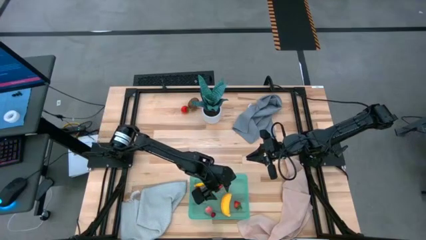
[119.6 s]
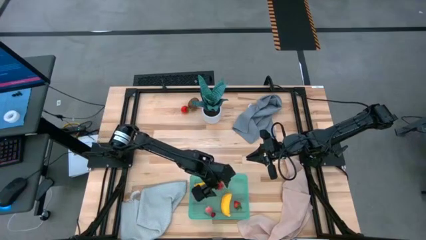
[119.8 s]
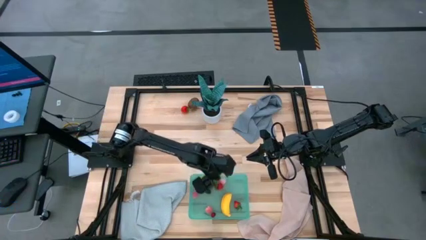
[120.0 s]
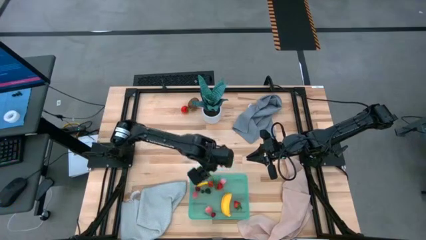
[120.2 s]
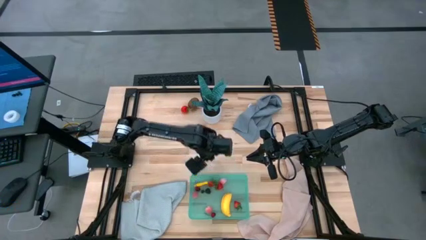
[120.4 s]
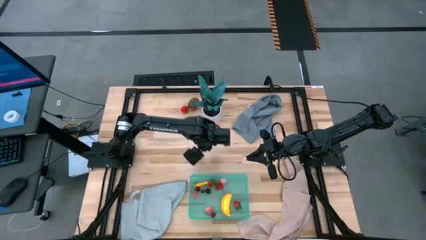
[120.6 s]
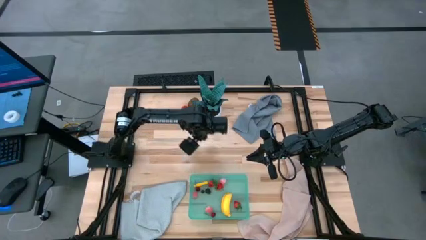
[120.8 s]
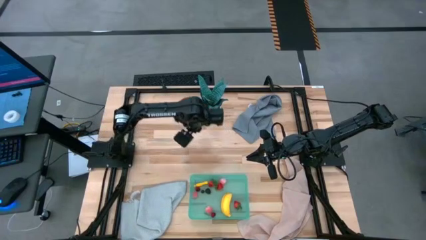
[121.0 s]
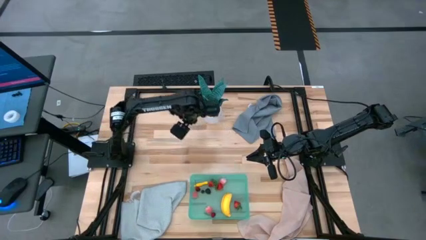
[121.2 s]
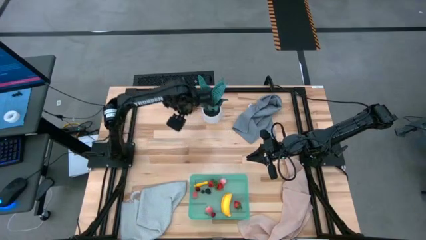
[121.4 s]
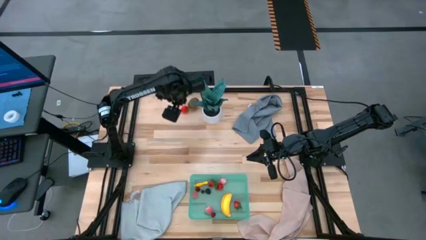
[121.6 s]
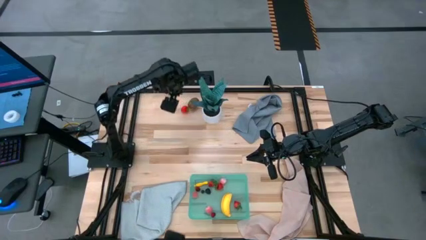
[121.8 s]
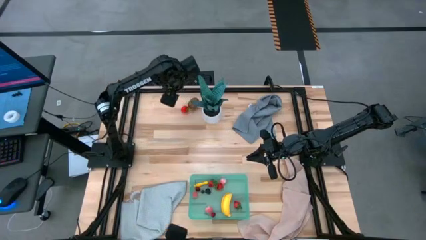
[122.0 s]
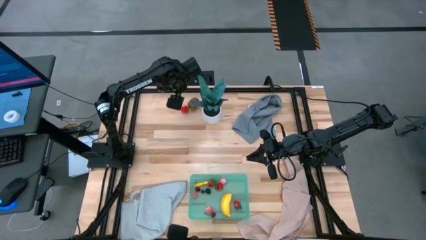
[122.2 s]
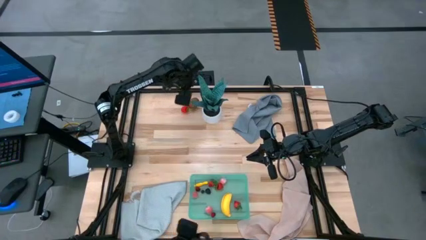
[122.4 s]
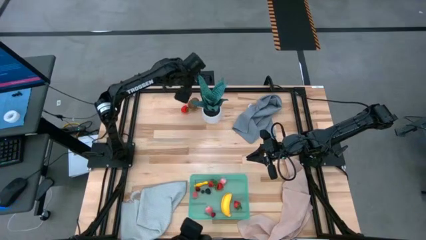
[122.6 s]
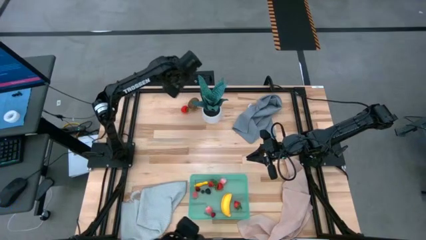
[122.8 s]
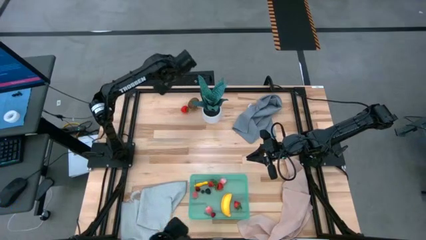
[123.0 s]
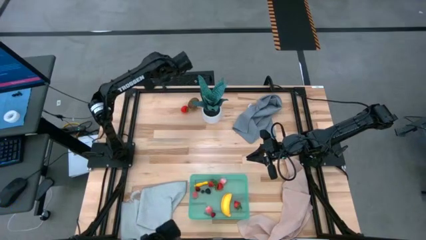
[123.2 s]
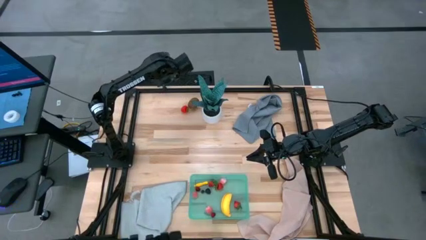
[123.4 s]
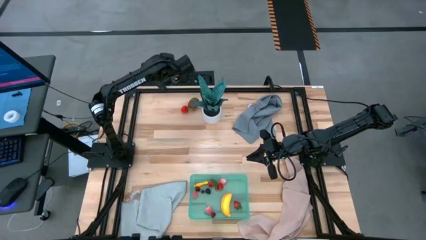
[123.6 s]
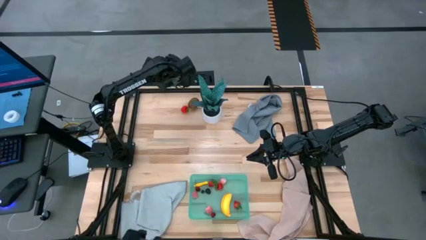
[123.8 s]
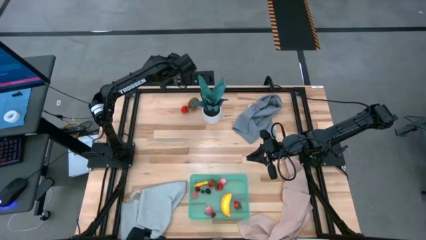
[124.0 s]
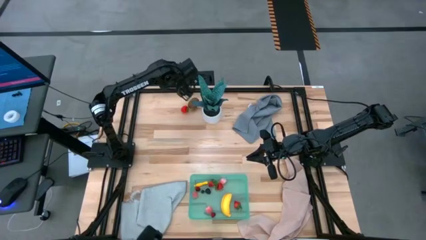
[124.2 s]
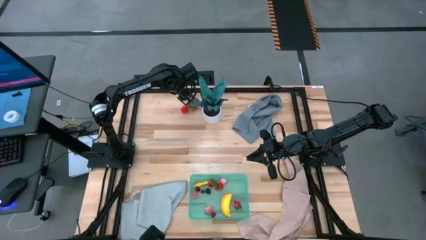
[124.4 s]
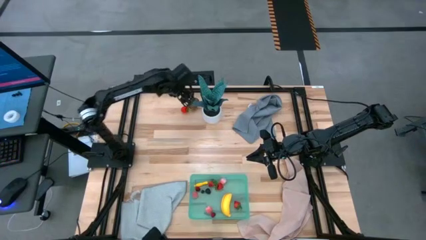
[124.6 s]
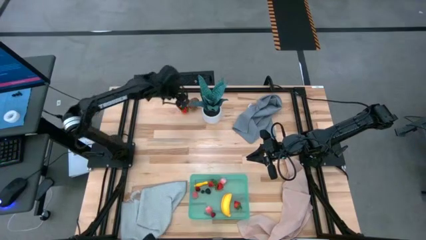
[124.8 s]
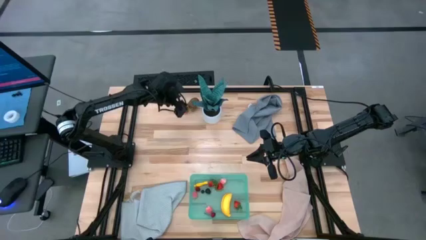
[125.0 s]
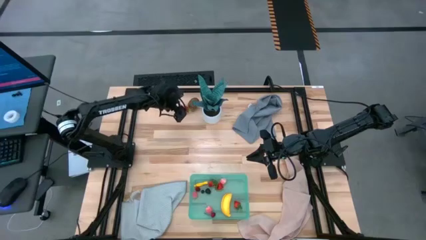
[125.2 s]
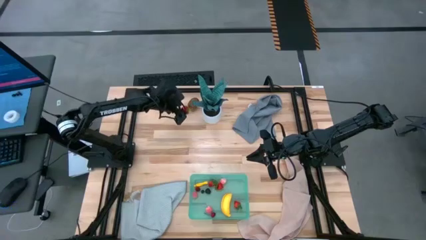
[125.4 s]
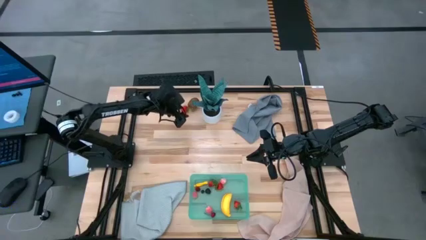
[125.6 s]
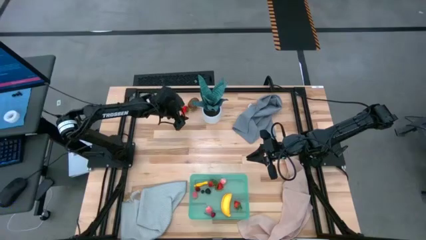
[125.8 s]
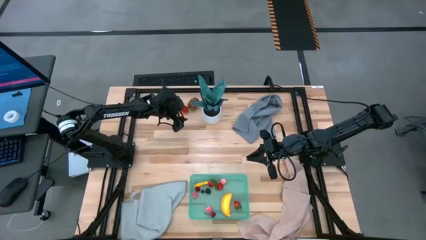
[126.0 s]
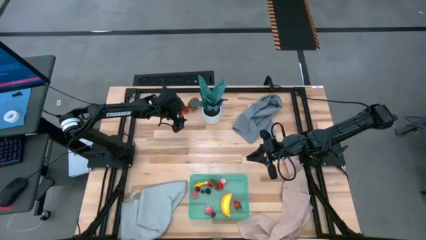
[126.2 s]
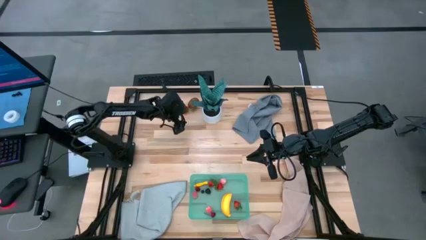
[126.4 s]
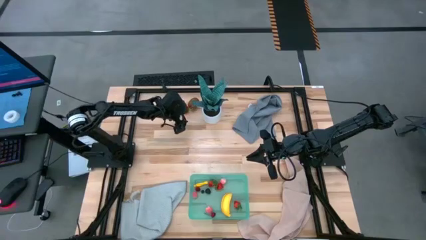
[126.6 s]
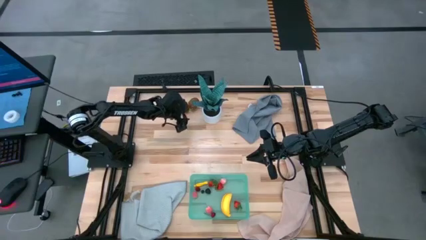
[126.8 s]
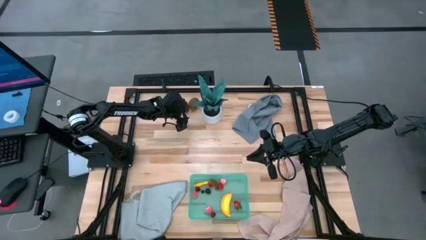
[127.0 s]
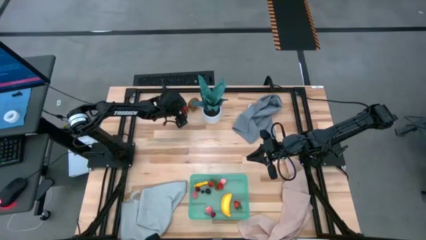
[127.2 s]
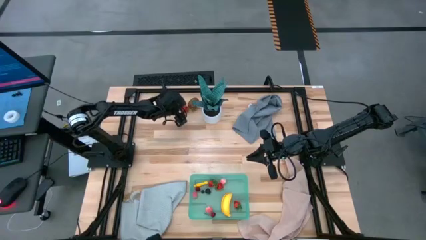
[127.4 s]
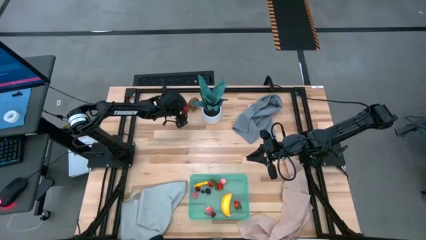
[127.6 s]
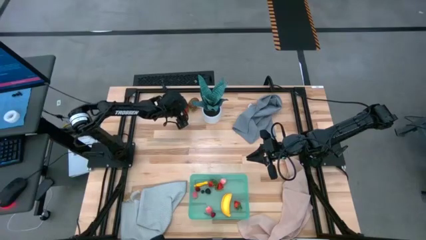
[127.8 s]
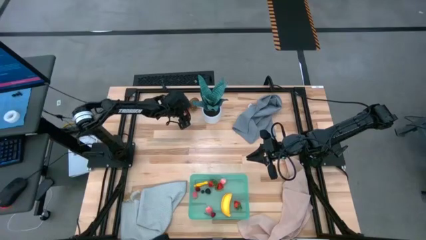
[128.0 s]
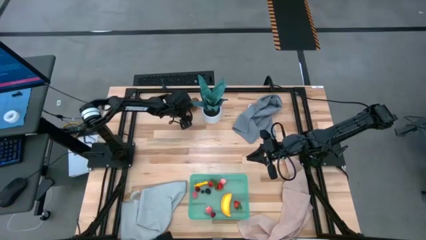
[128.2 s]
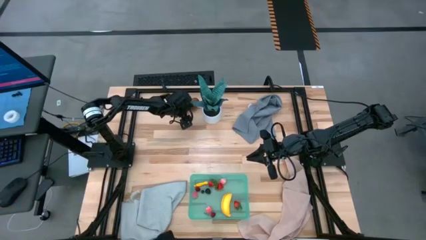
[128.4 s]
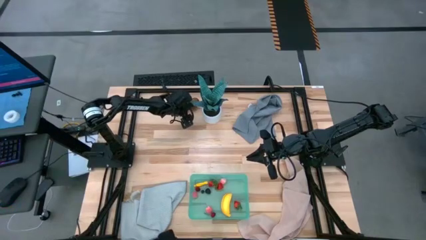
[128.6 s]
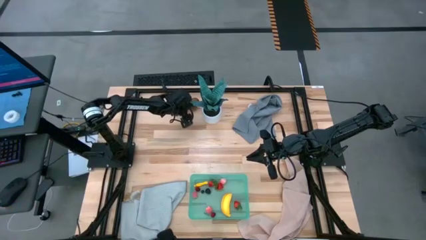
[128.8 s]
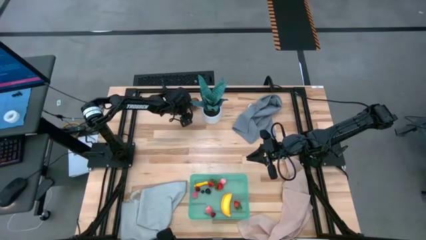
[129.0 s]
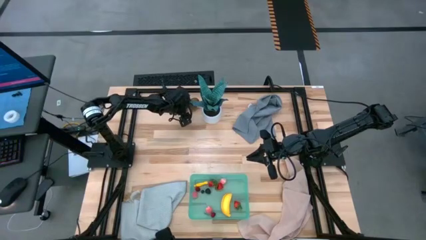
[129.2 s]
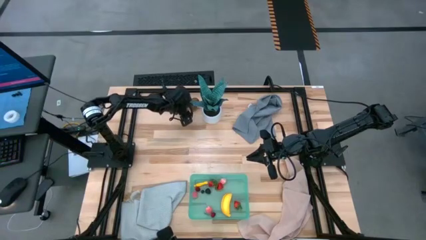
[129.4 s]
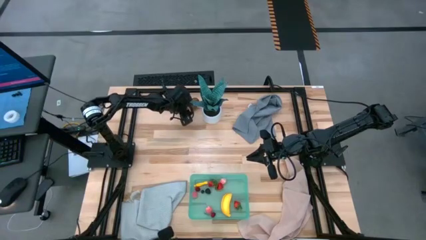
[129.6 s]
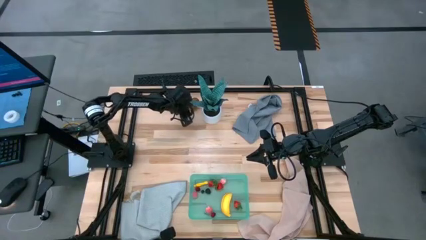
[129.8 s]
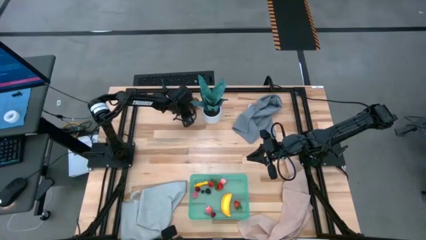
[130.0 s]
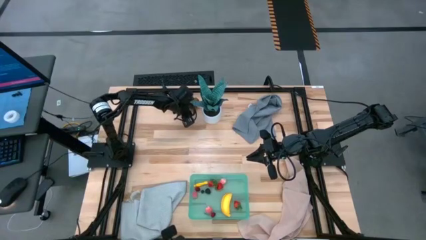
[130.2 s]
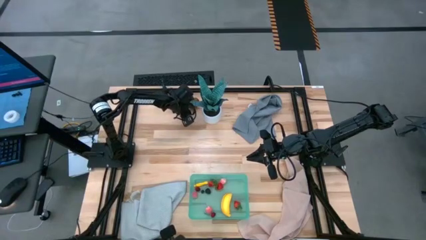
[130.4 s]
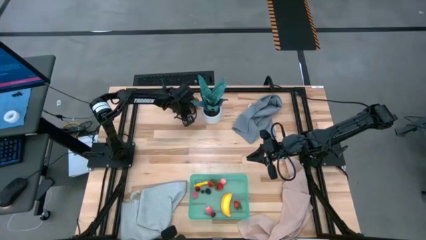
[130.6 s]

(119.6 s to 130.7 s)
Task: Pick and placing Produce into tupperware
Put the red strawberry into the green bin
